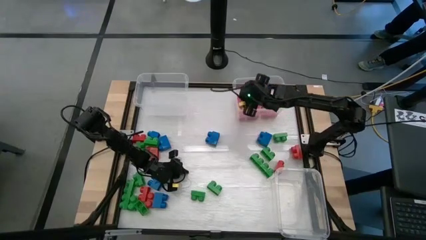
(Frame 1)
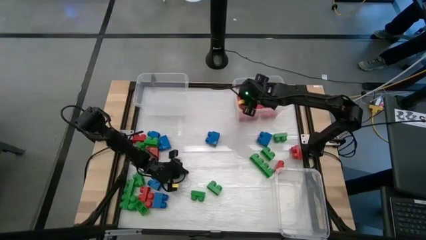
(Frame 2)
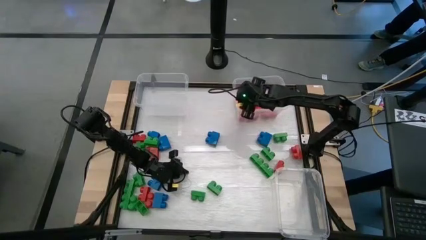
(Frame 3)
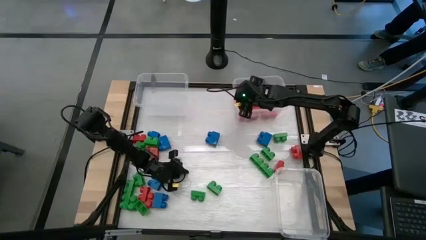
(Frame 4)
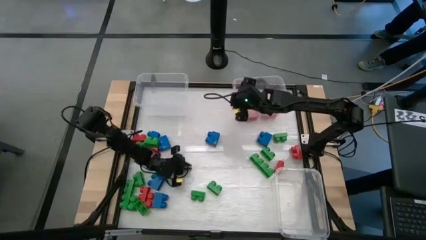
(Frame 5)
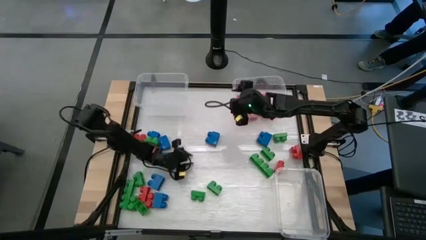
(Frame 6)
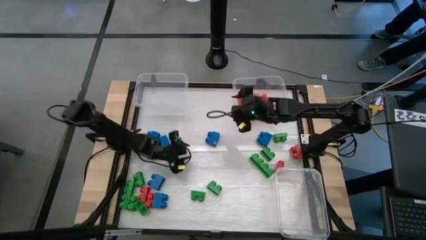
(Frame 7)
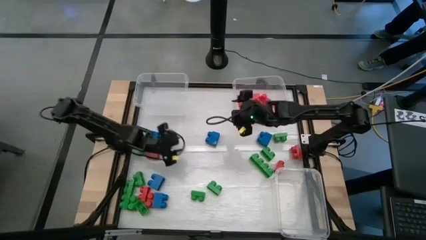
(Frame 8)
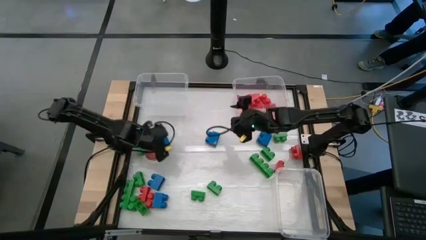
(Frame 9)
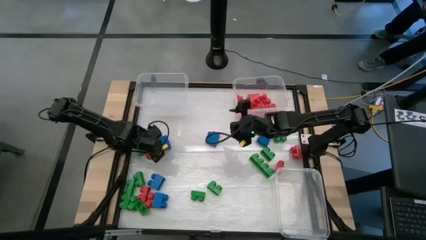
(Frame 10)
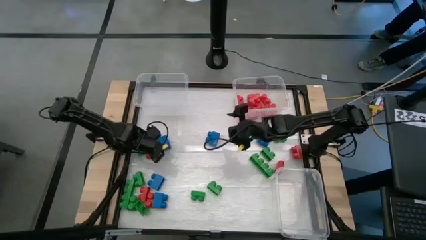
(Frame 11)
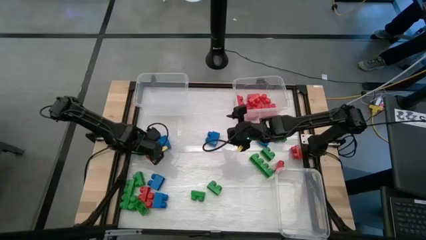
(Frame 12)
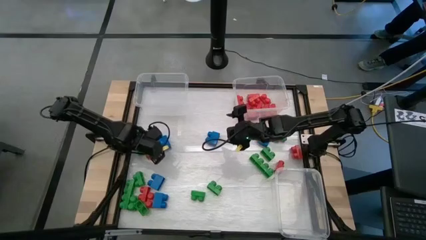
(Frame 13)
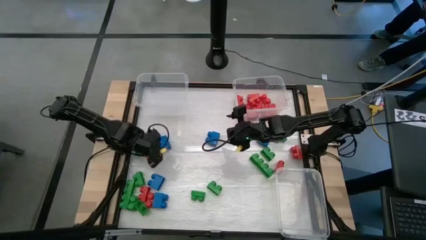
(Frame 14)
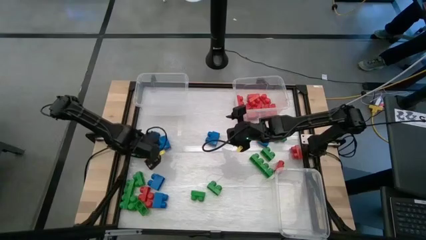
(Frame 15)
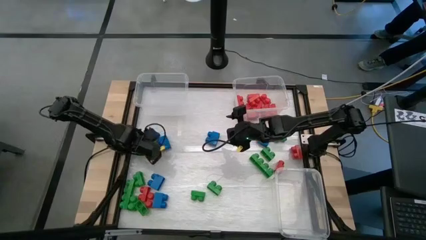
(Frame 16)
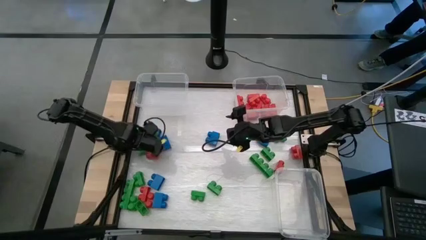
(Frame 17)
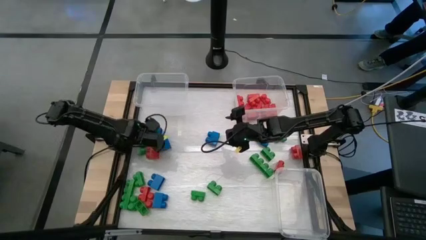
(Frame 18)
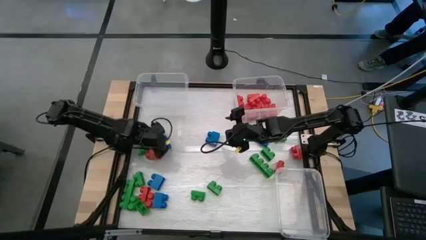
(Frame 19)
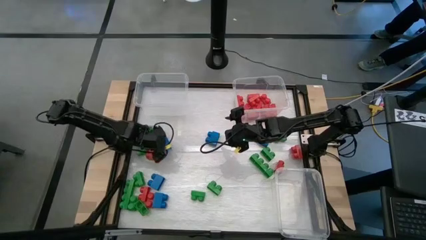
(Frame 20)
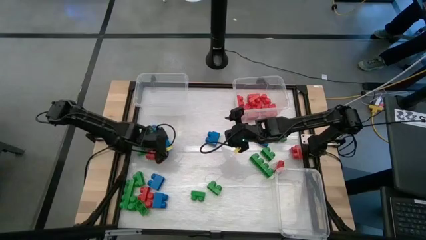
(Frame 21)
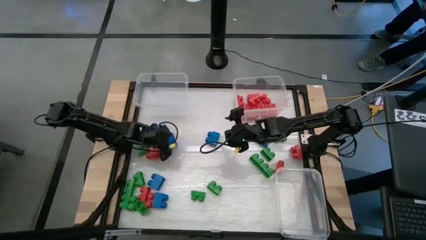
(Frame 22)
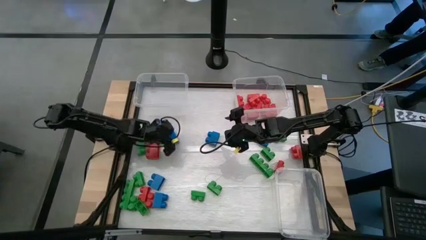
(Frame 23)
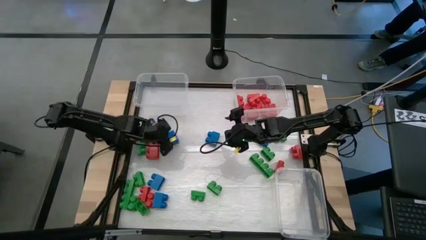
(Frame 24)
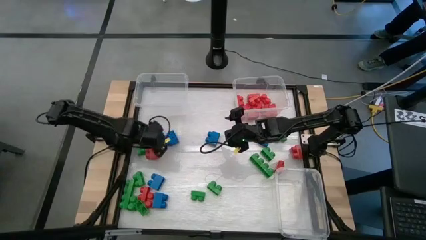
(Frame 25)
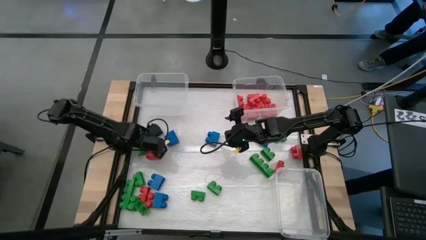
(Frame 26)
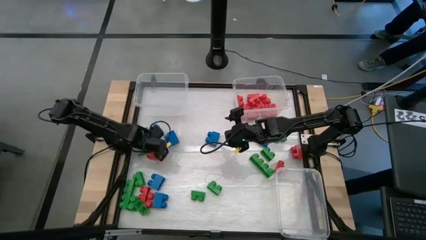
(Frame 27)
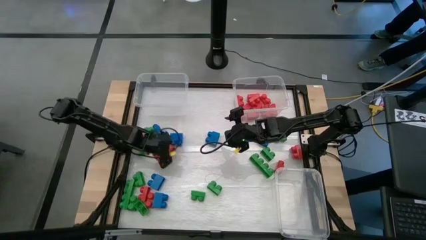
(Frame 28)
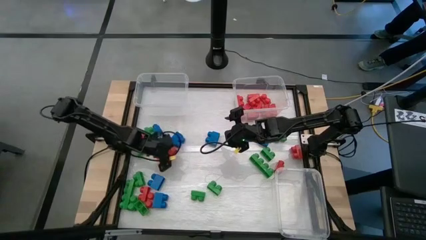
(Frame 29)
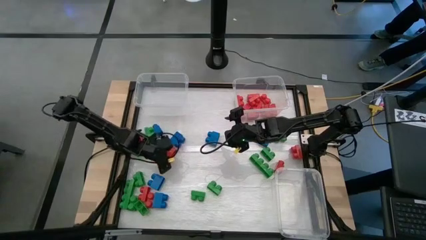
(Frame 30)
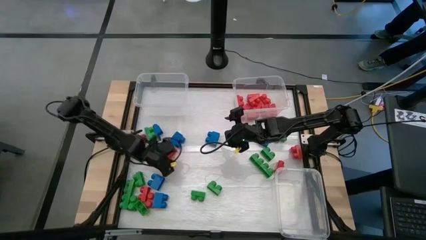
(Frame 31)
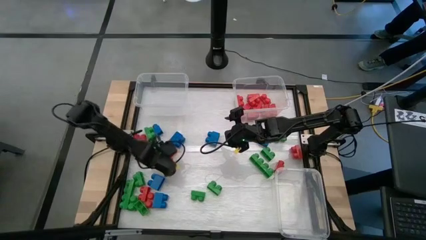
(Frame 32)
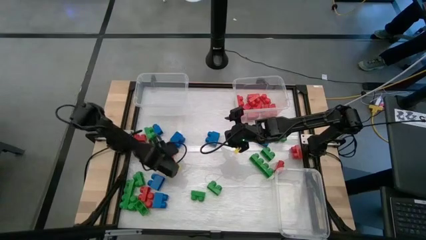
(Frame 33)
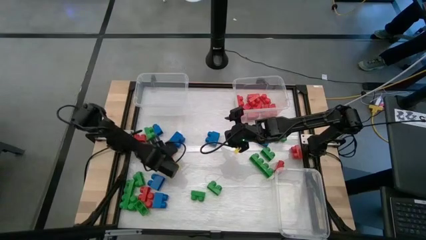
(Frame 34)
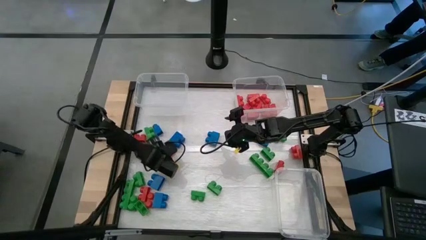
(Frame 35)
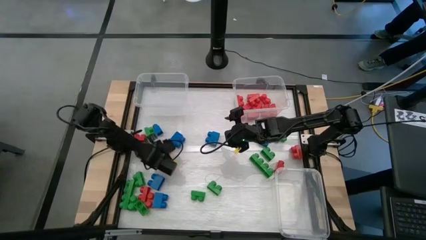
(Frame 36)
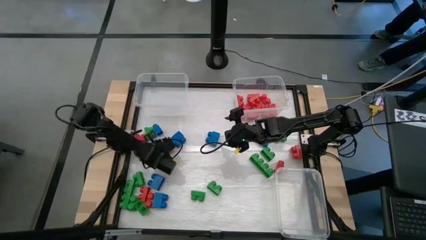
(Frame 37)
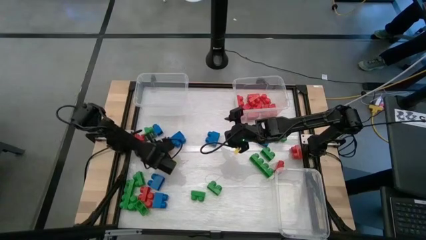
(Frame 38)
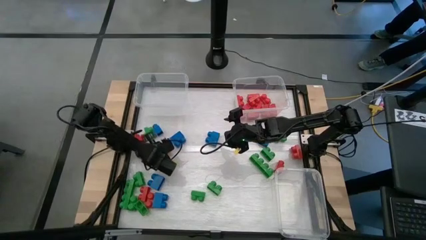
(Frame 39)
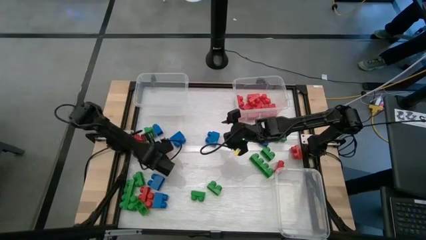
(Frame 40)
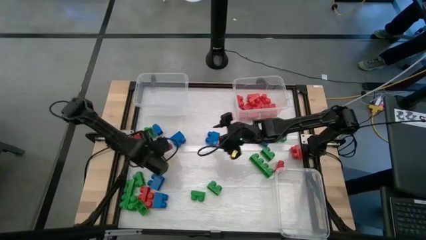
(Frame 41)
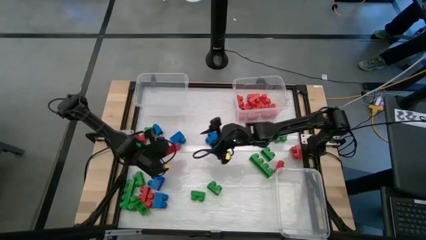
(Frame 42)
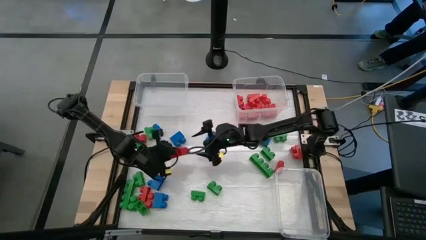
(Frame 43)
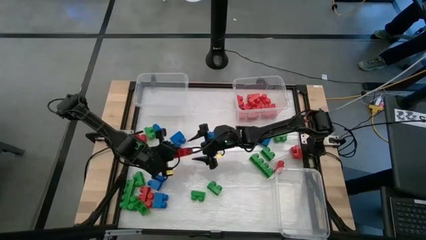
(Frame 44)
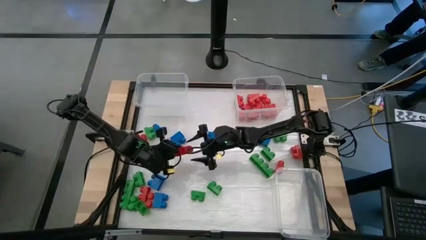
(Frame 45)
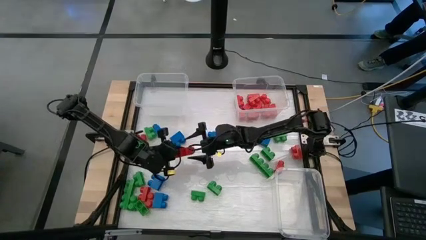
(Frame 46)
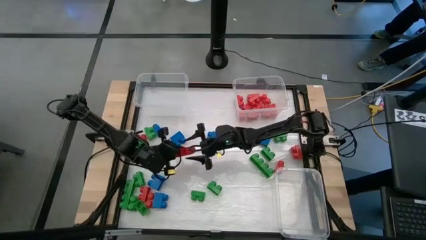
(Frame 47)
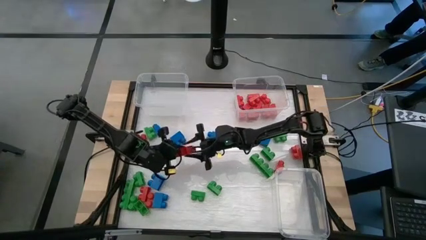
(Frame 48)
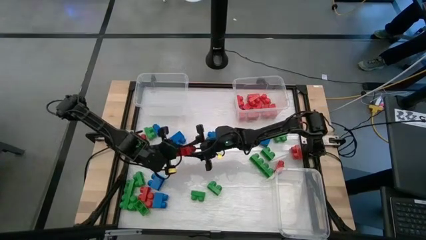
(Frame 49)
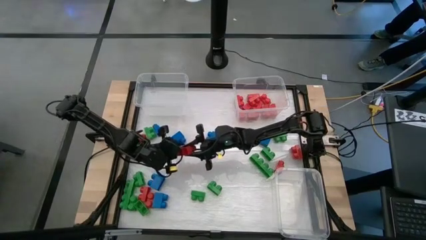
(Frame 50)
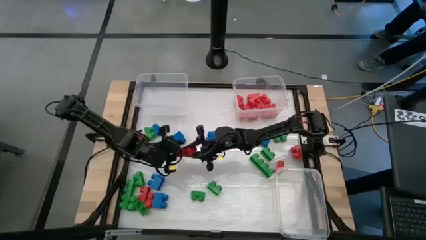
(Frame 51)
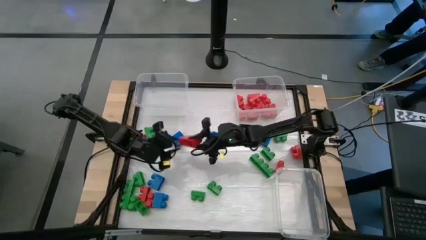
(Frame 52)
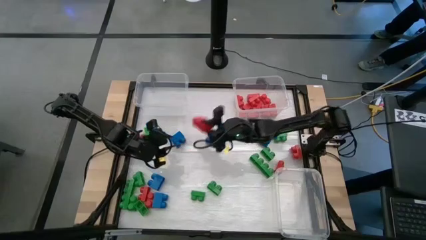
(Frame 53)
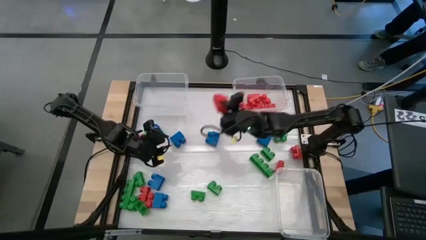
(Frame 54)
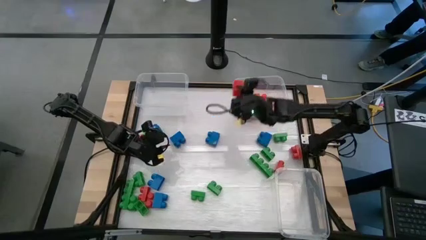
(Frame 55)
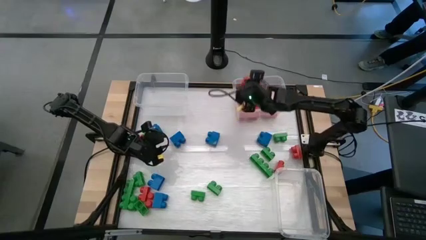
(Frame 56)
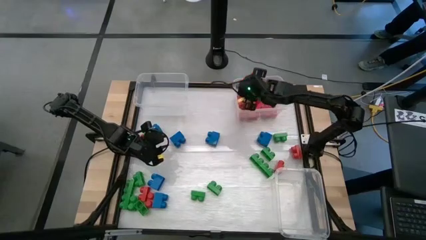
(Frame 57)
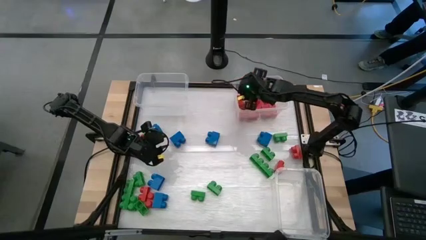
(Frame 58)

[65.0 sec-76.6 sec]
Task: Sort blocks
Put the red game piece into the top right transparent bin

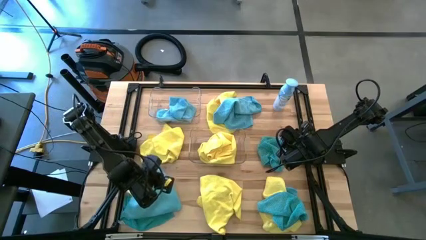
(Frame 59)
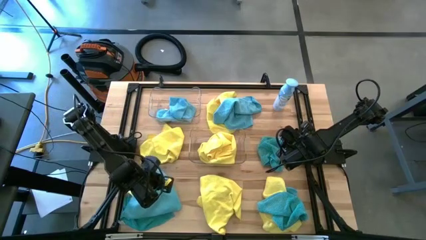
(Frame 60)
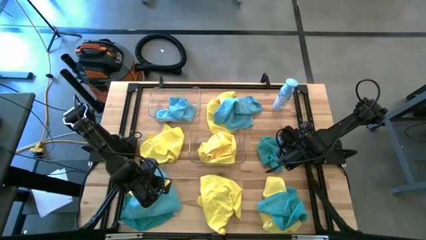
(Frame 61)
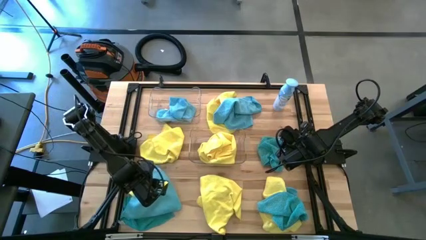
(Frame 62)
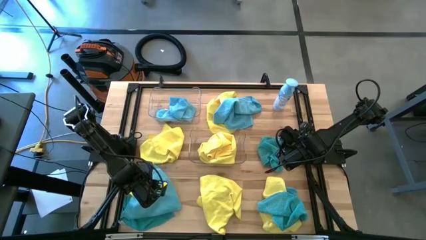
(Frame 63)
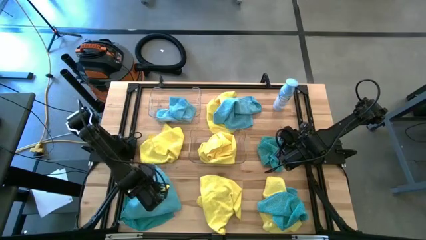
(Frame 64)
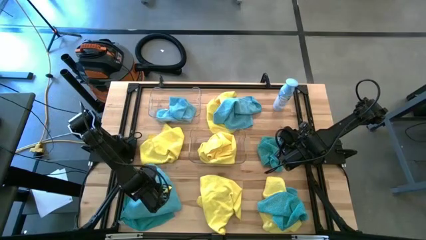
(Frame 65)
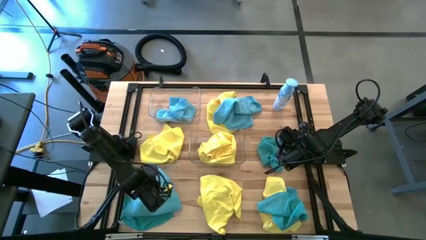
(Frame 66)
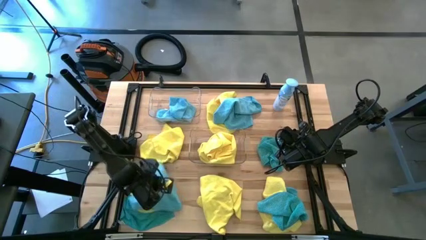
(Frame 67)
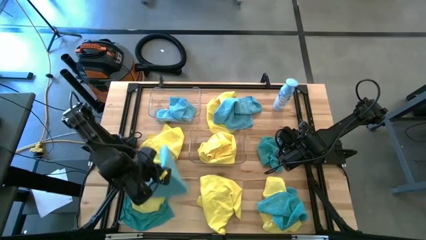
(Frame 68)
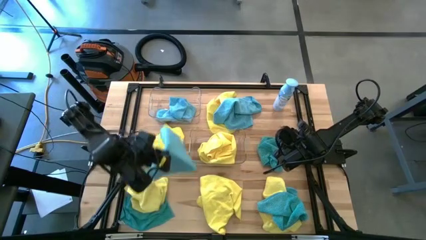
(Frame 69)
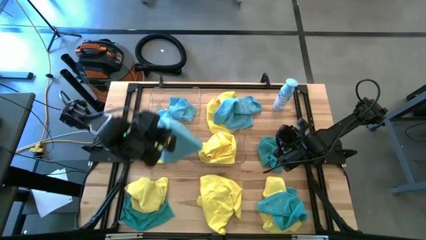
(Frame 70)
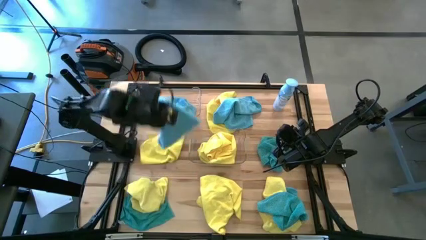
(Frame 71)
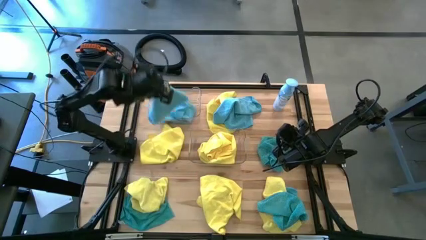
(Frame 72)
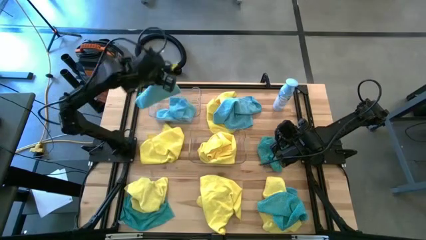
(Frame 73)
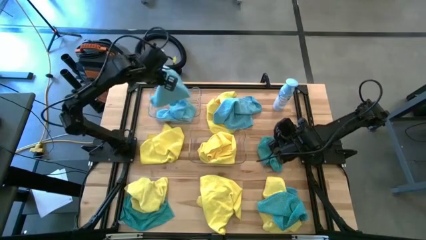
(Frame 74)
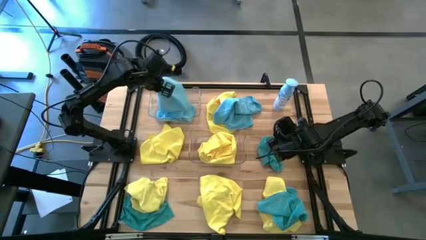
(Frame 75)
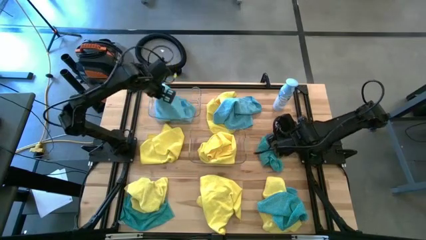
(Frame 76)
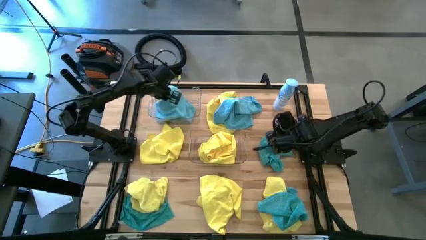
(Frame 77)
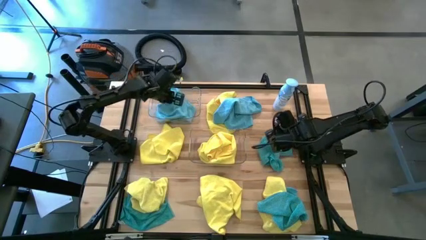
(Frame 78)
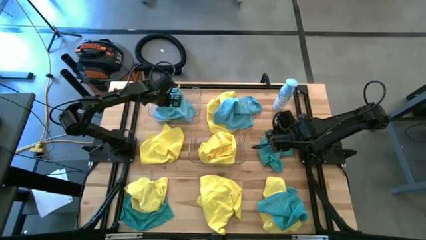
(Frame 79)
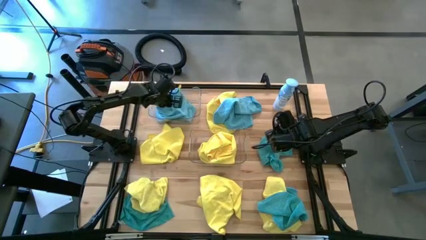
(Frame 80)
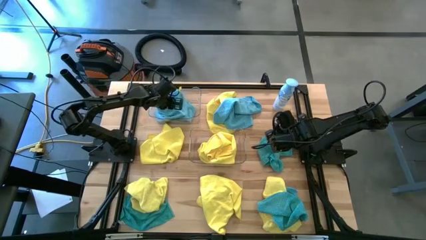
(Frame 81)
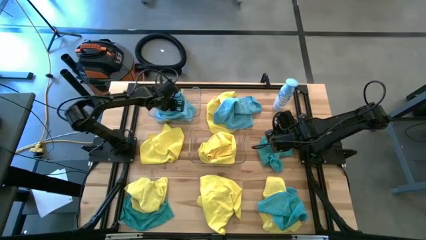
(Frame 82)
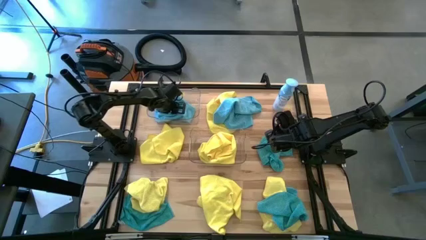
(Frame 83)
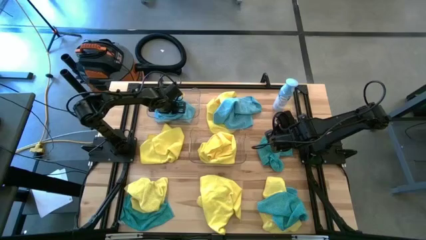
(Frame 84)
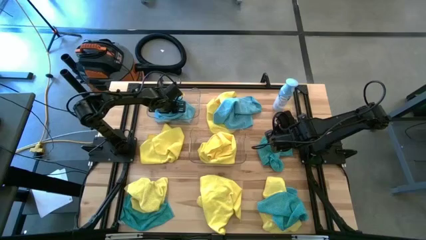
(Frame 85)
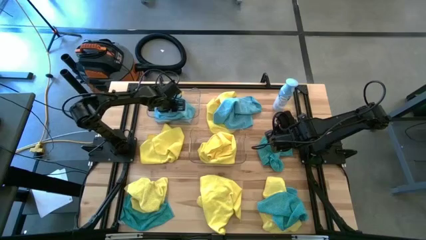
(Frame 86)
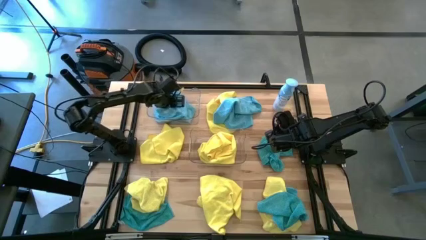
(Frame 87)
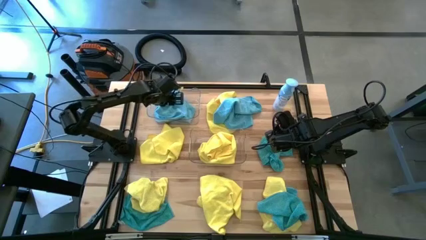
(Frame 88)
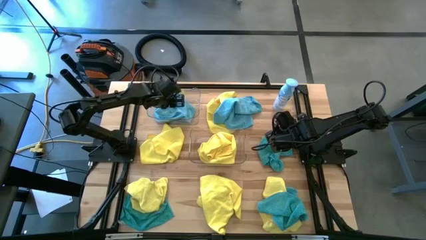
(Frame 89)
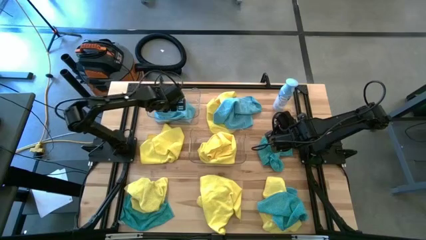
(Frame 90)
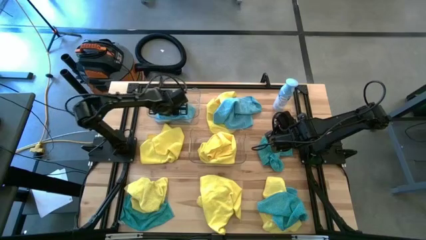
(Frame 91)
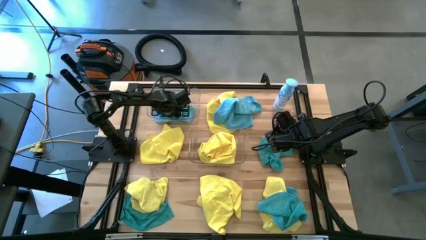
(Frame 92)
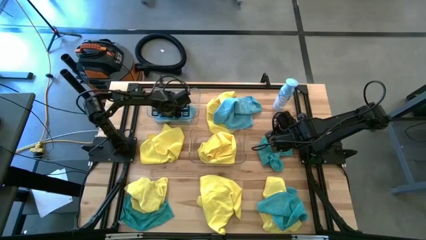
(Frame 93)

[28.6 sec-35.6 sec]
Task: Sort microfiber towel by color & place in baskets
Put the blue towel into the top transparent bin
